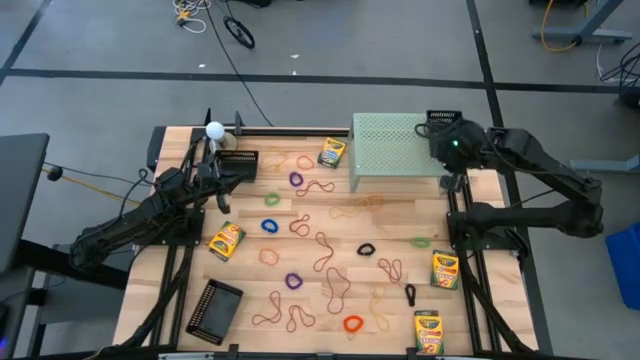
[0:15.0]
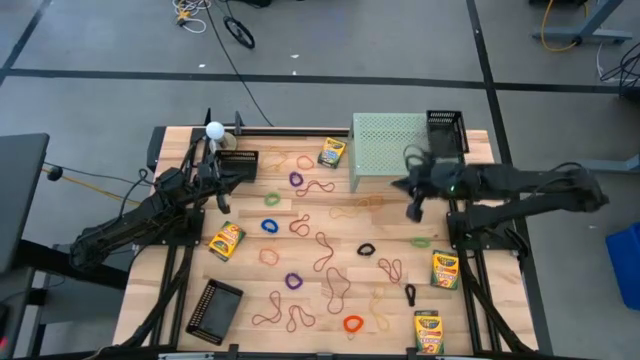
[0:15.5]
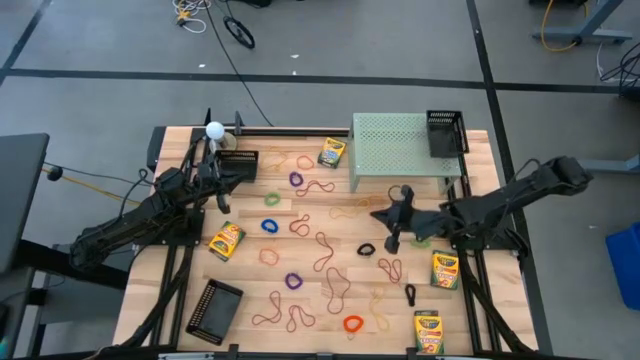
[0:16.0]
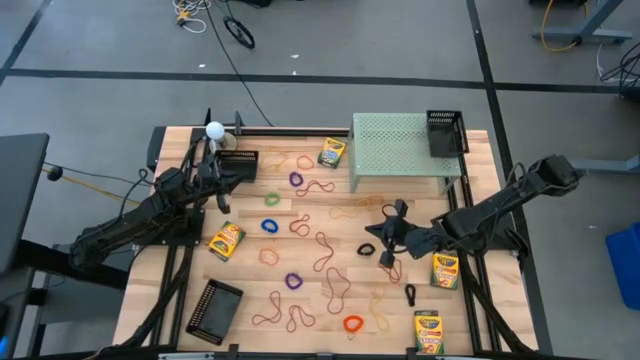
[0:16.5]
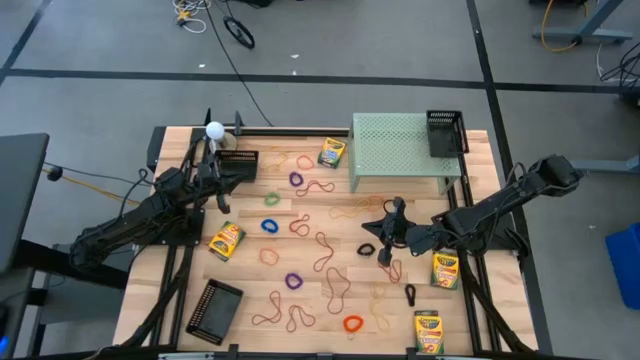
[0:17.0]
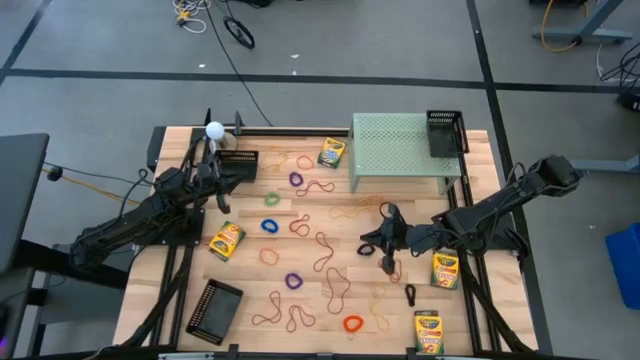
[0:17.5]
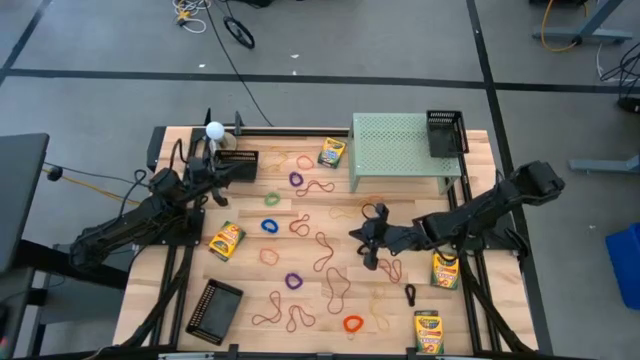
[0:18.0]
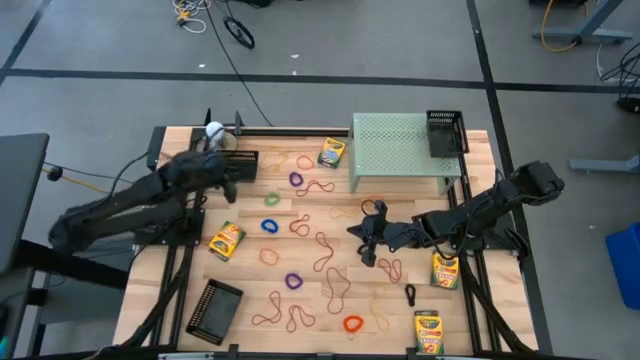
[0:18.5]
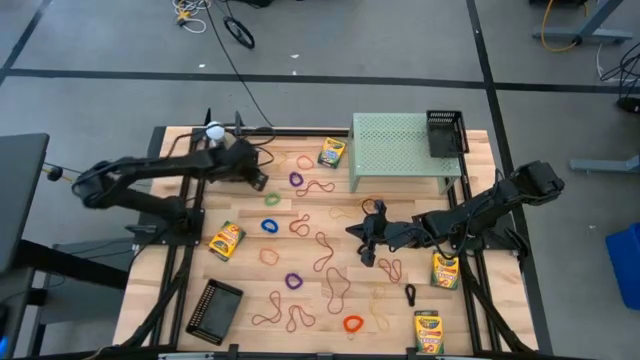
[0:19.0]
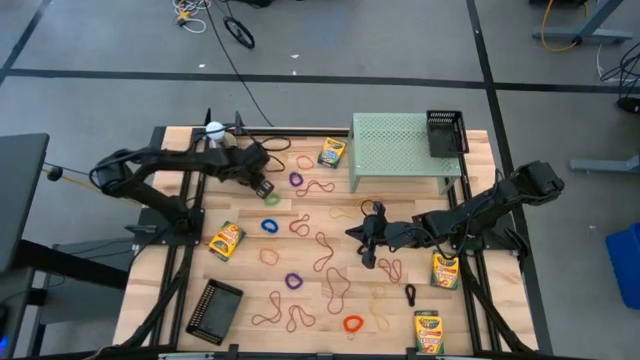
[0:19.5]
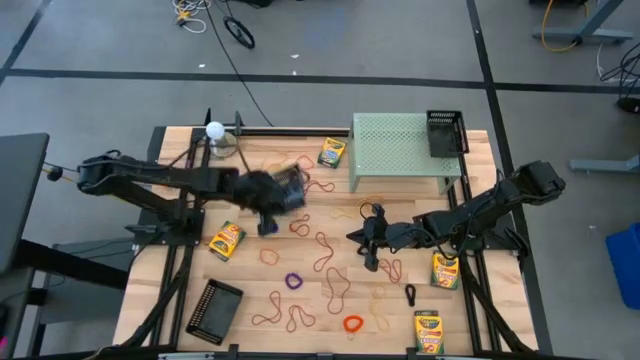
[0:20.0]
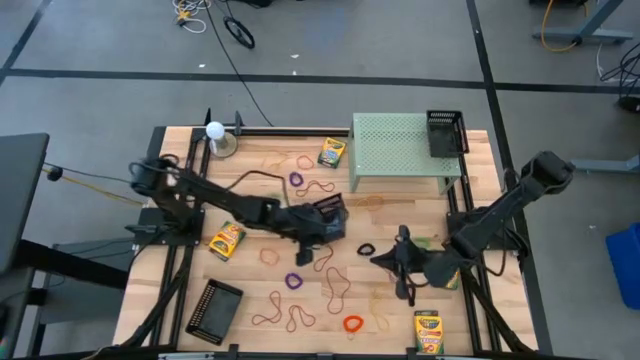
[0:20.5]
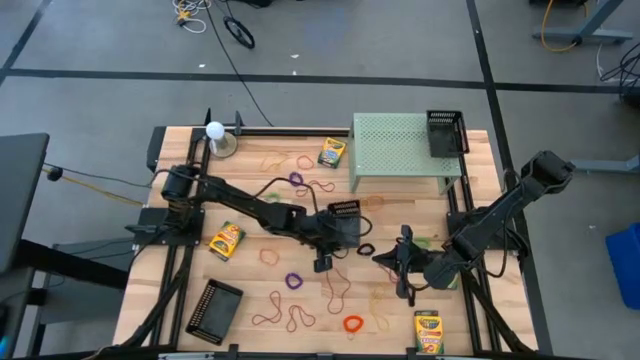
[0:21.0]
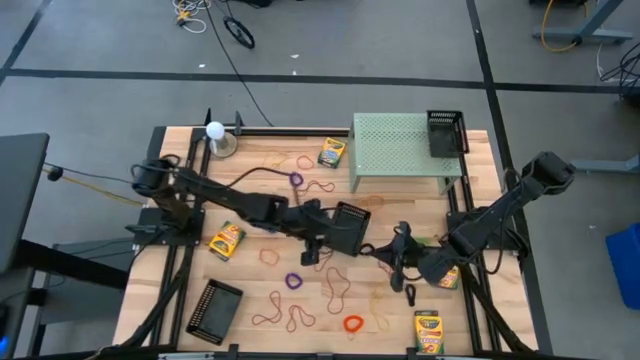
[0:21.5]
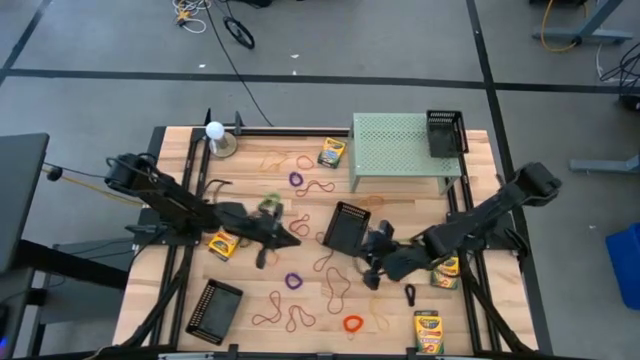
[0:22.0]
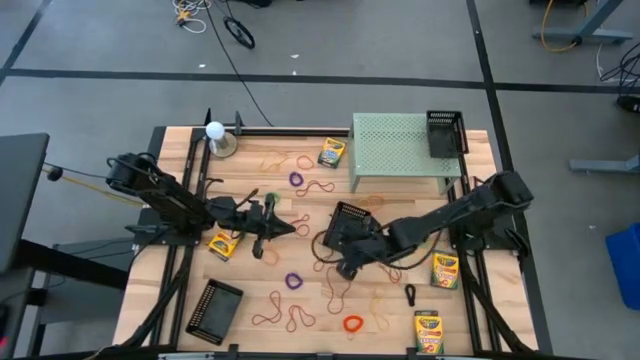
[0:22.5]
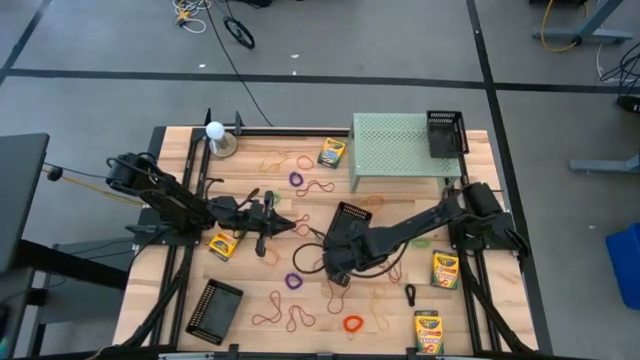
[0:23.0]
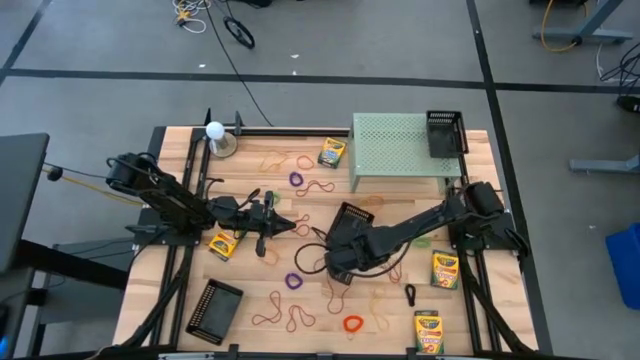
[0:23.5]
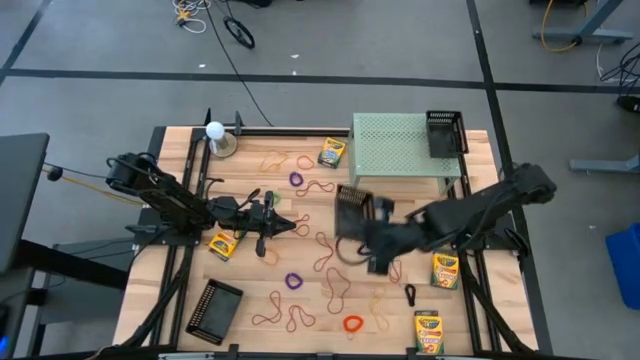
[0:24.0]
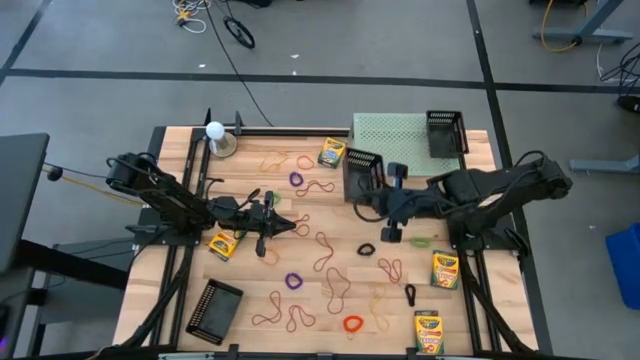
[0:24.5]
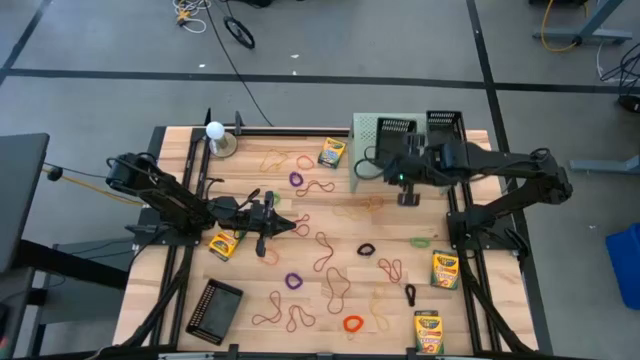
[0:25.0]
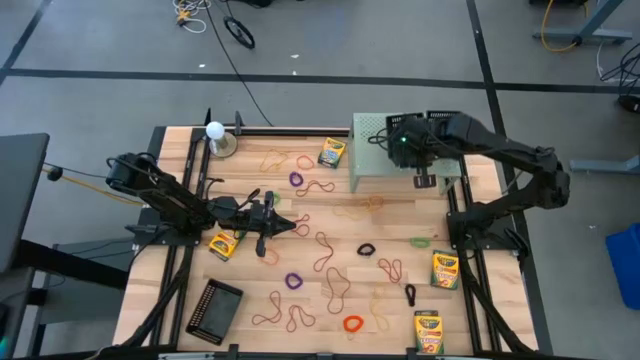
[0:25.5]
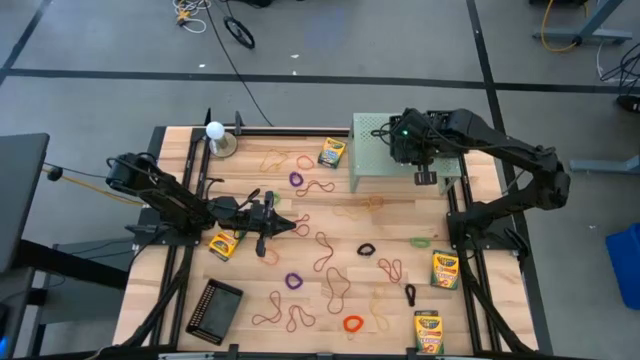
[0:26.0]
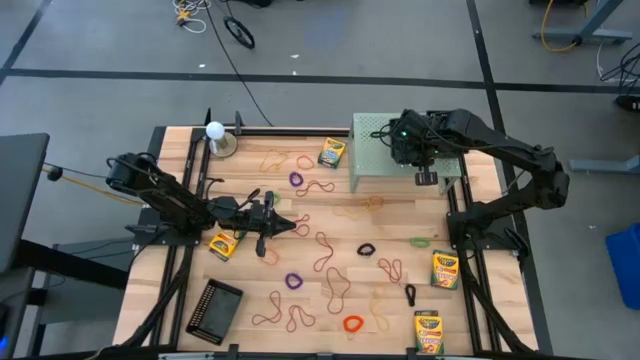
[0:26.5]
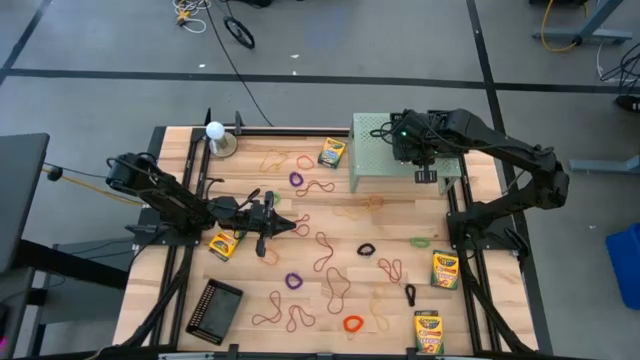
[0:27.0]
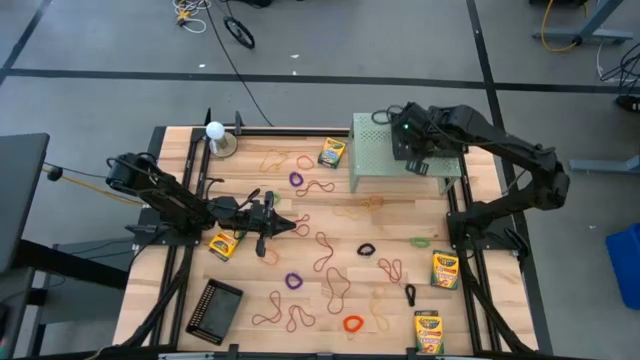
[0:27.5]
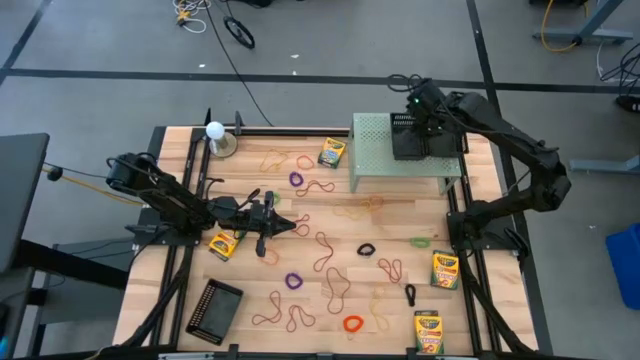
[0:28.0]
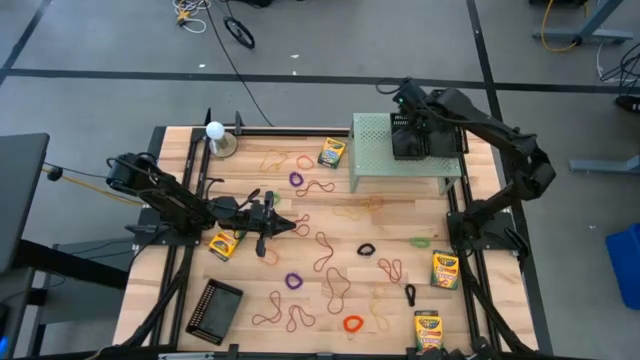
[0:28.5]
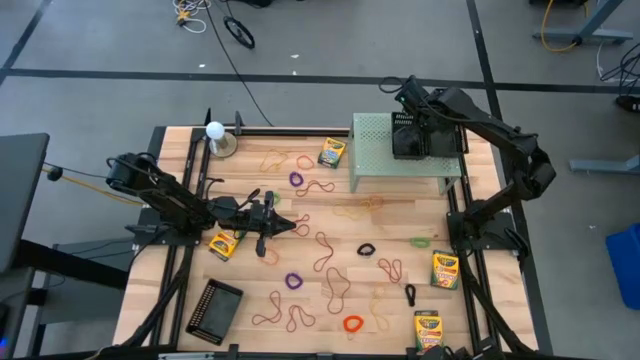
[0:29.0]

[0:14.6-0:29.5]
Task: Pick & Place Office Desk Supplies
Put the top black basket on the shelf

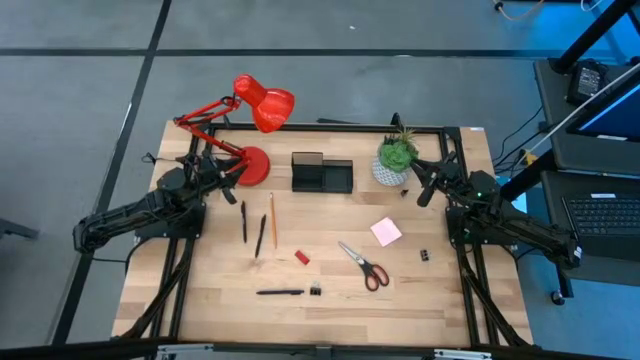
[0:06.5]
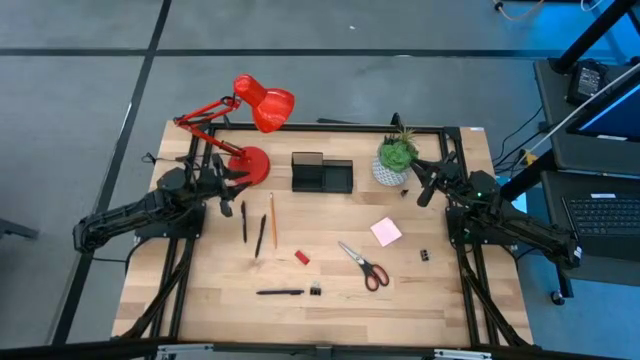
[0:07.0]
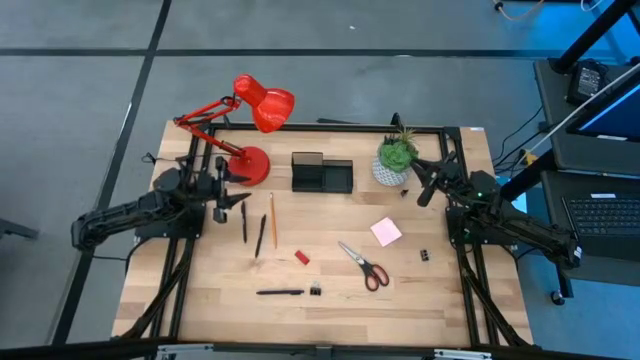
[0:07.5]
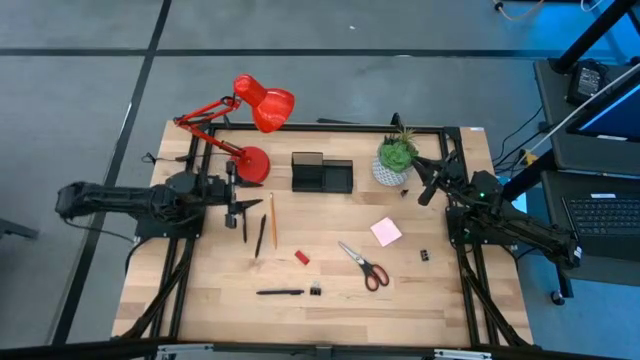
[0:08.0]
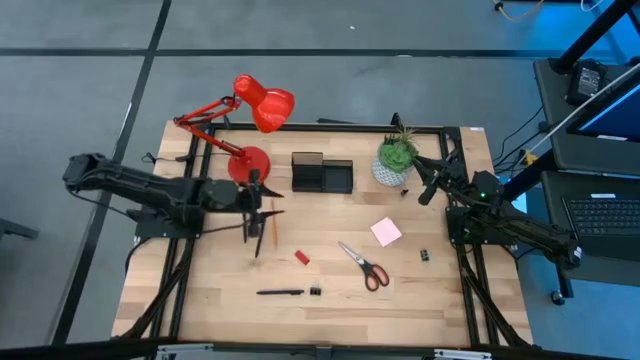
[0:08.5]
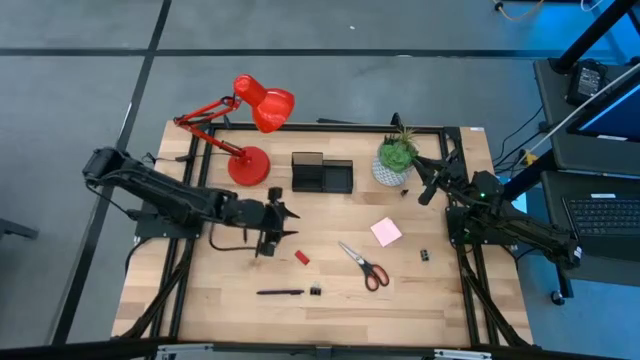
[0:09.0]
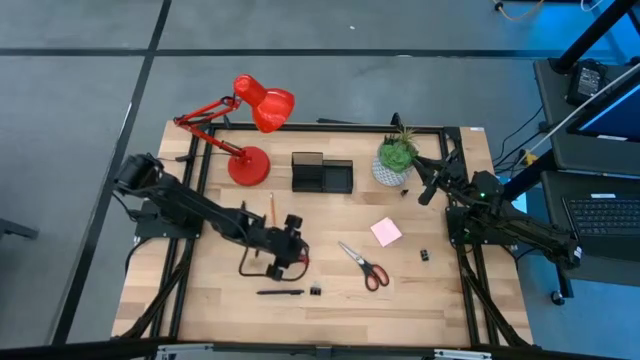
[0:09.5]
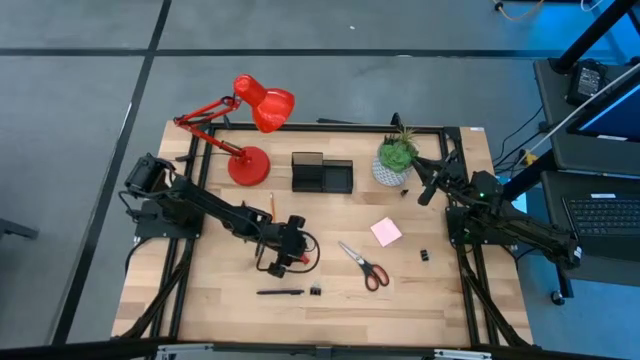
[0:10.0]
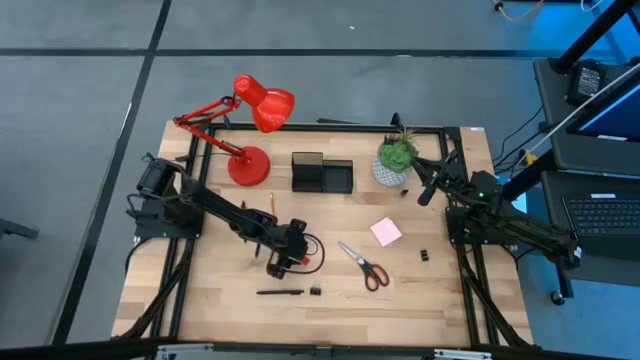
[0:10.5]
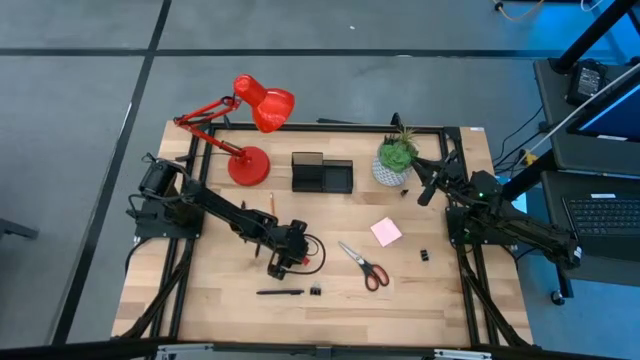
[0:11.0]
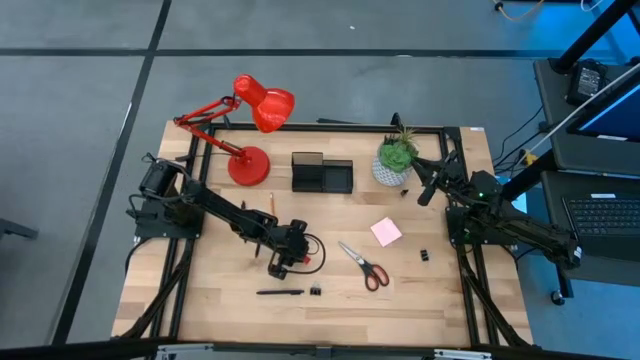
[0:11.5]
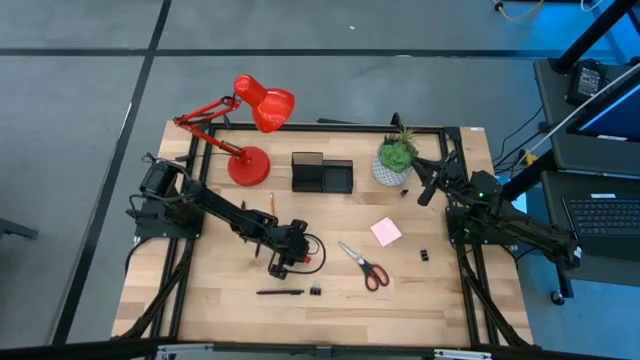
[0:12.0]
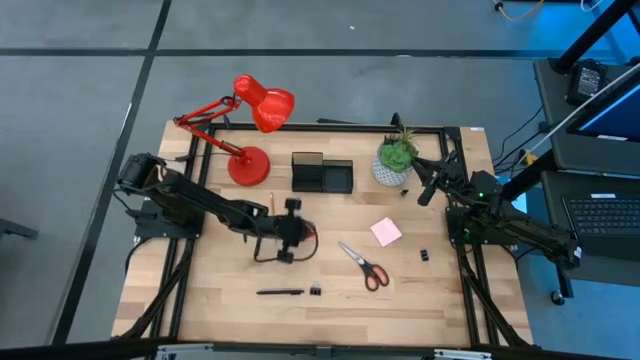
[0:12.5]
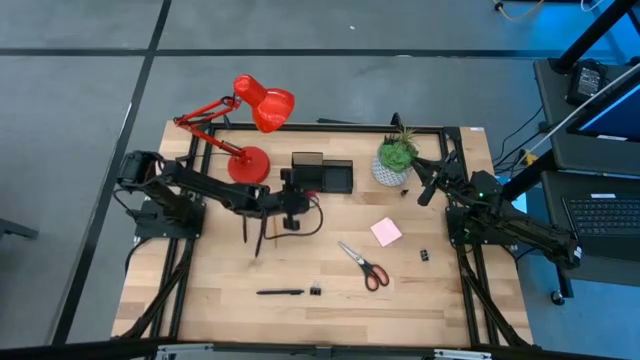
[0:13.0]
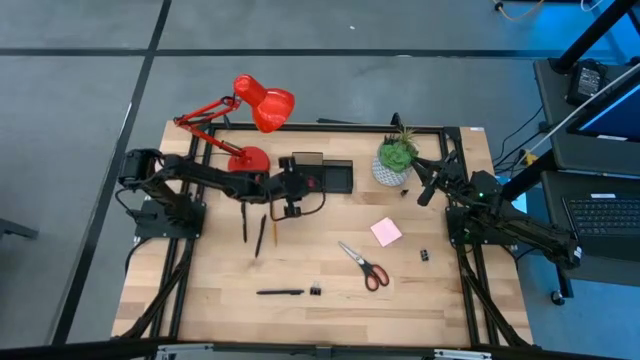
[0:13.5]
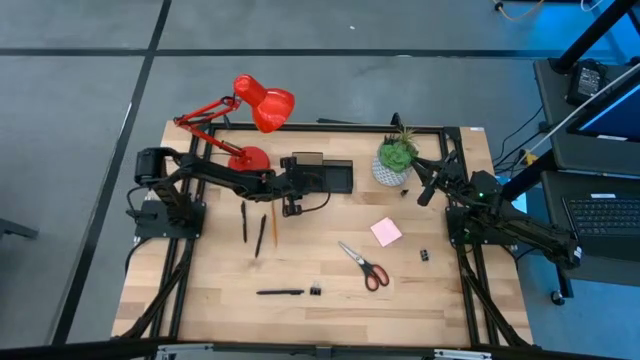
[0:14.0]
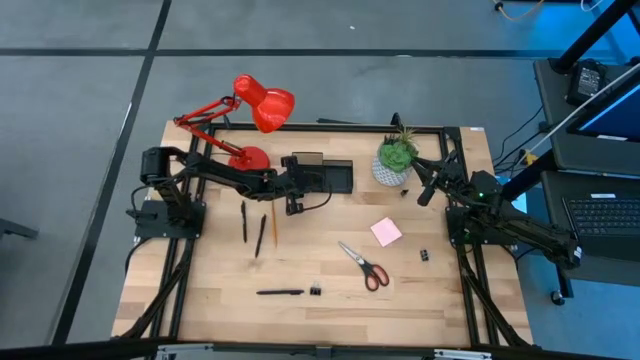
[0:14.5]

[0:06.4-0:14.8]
Task: Pick and place office supplies into organizer
Put the eraser into the desk organizer
